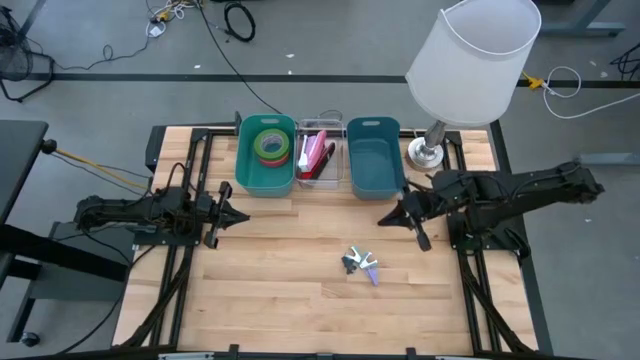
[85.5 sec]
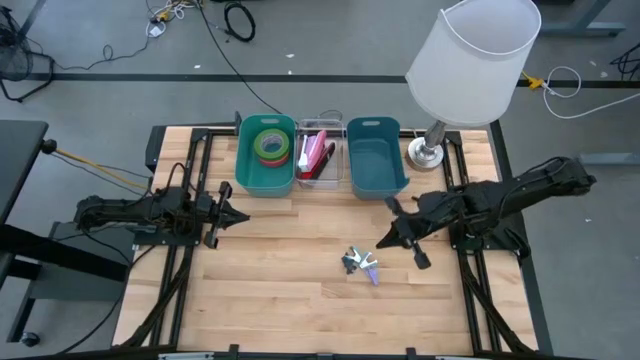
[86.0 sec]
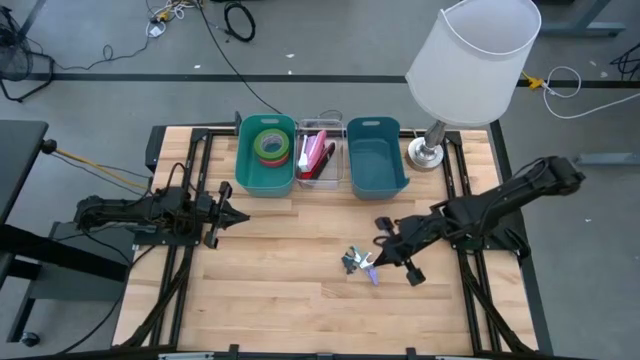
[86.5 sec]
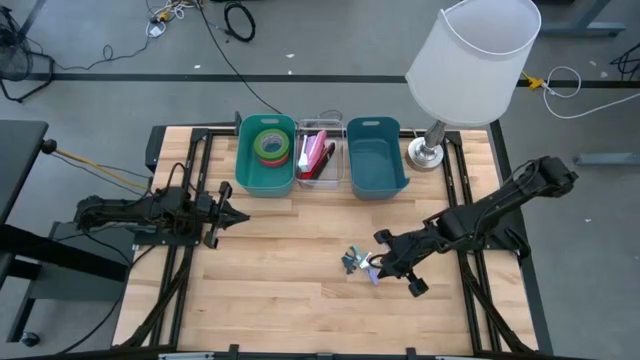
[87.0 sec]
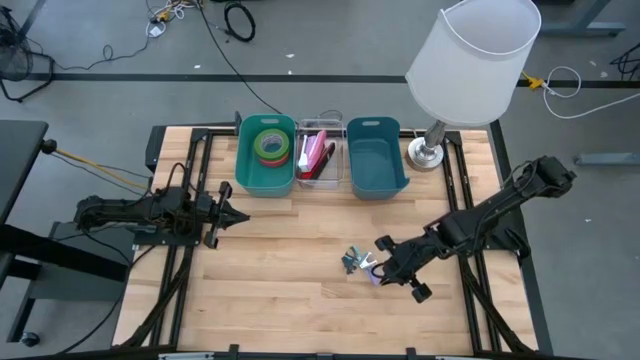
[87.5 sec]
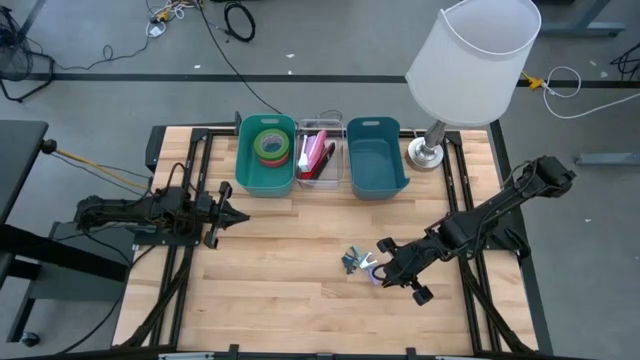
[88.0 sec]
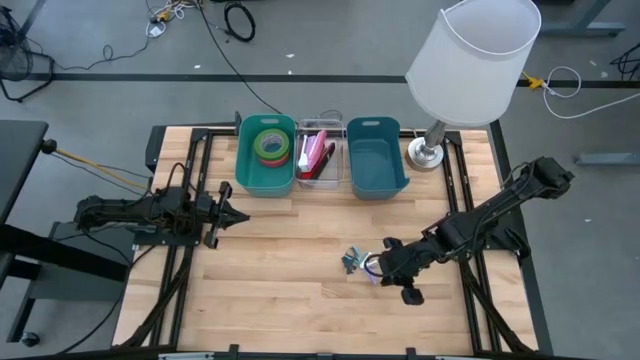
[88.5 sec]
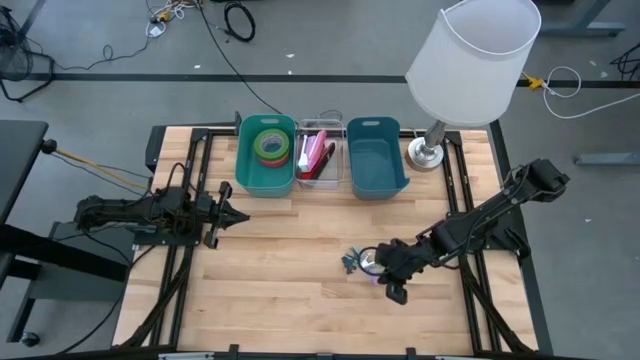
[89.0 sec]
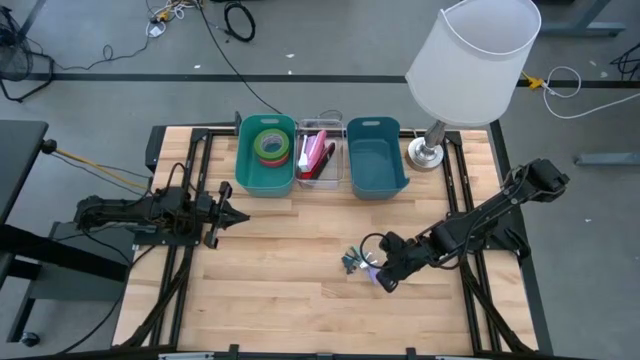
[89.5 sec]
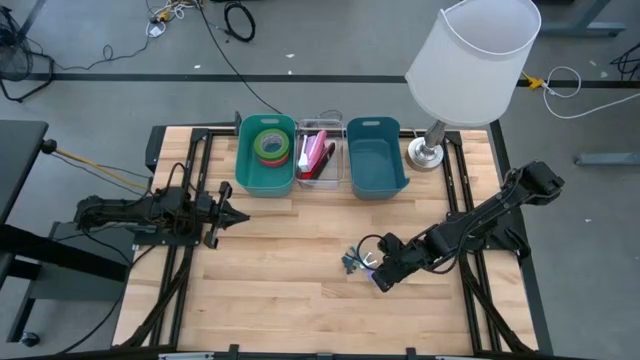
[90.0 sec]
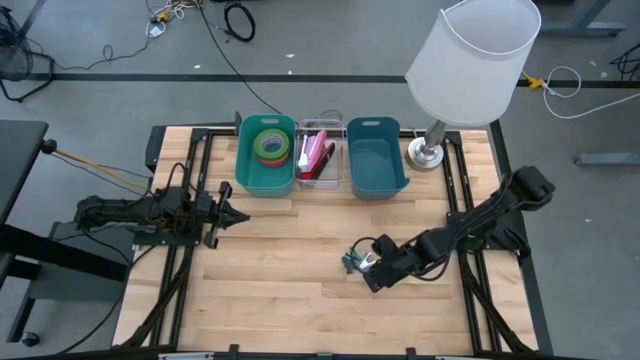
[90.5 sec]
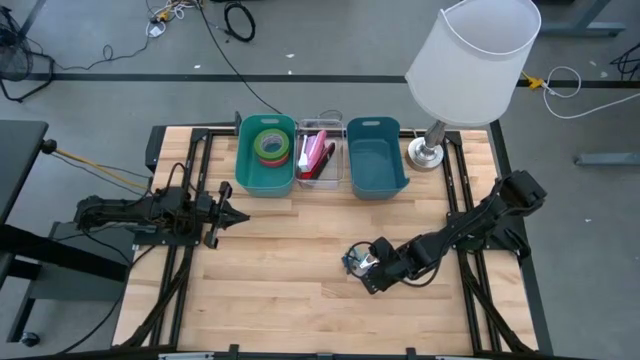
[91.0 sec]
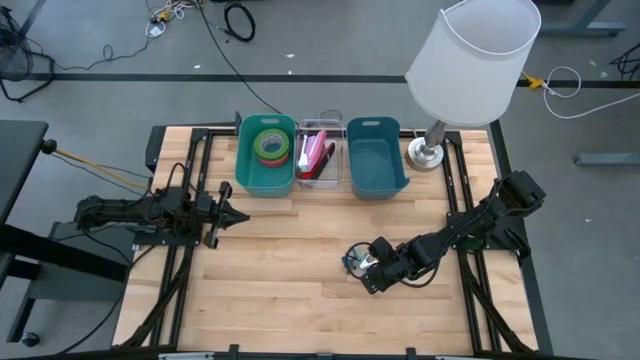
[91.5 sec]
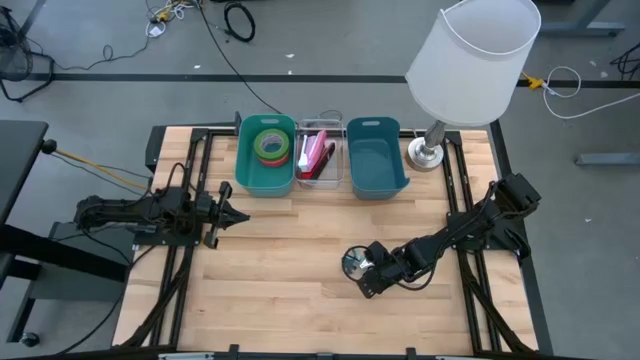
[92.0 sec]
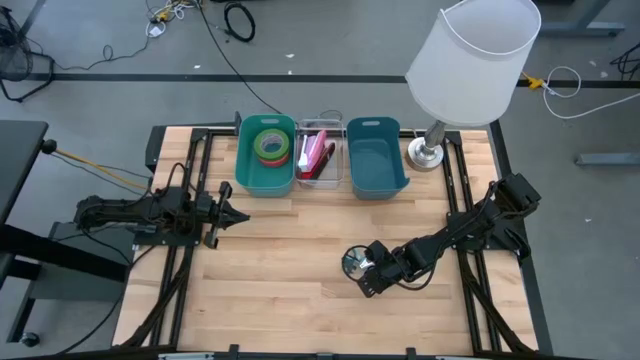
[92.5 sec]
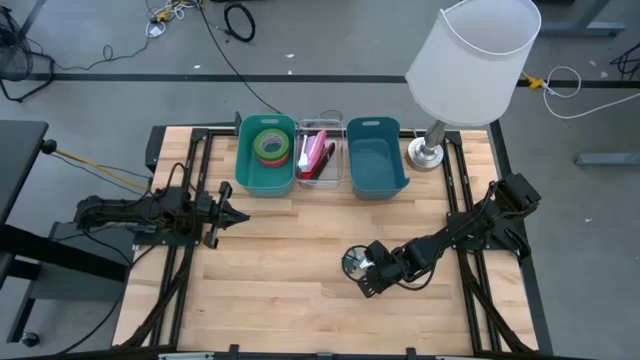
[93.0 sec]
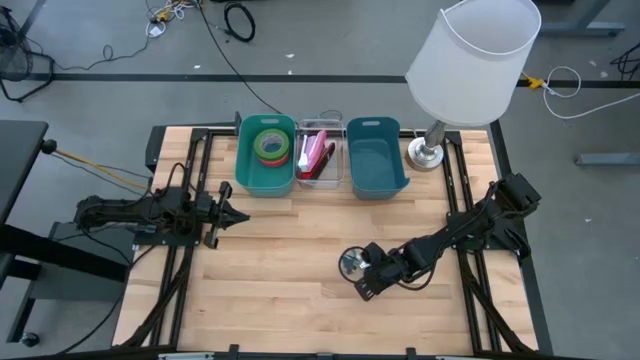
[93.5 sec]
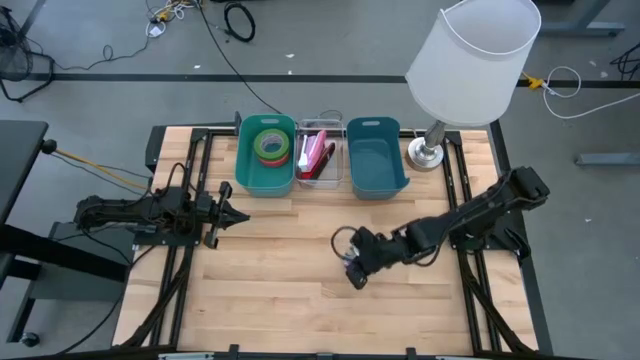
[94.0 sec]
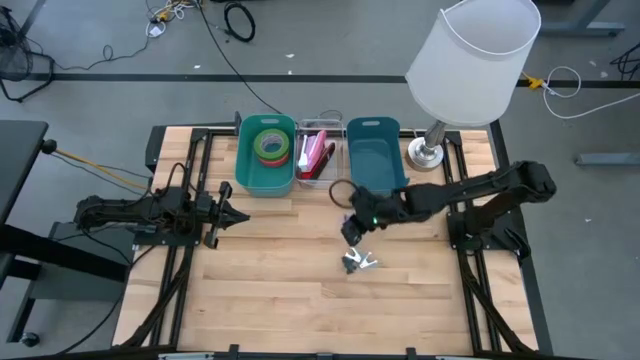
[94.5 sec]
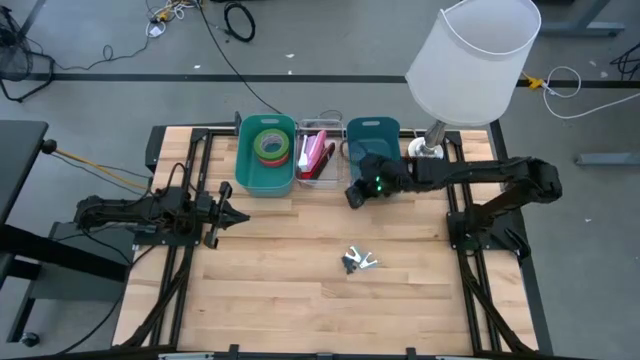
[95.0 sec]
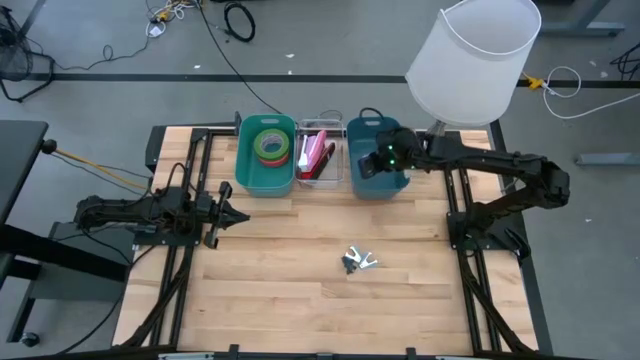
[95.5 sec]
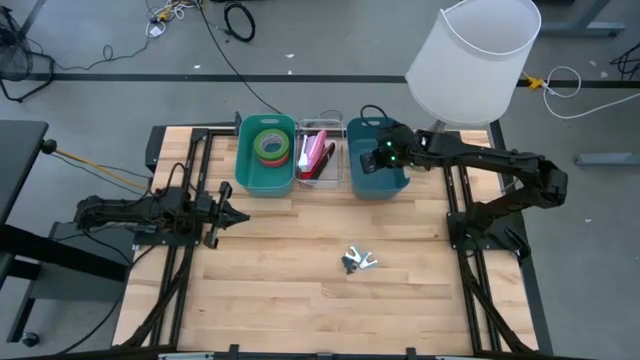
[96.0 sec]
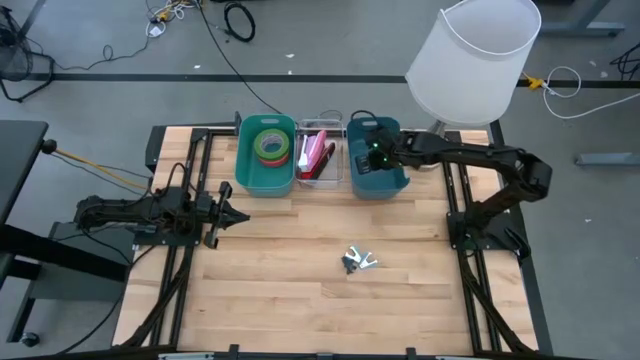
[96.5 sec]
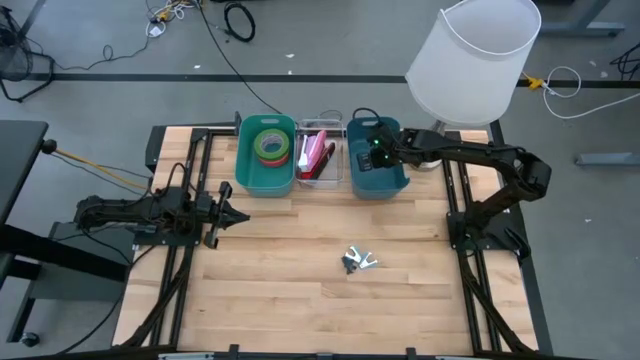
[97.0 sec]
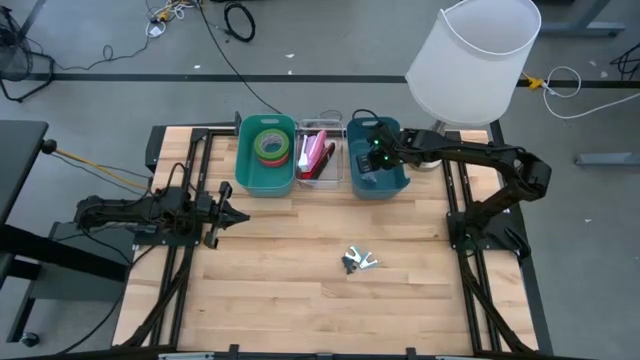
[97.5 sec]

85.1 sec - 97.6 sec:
Task: Pick and place Stapler, Stapler remover, tape
Put the violet staple remover into the blue bin

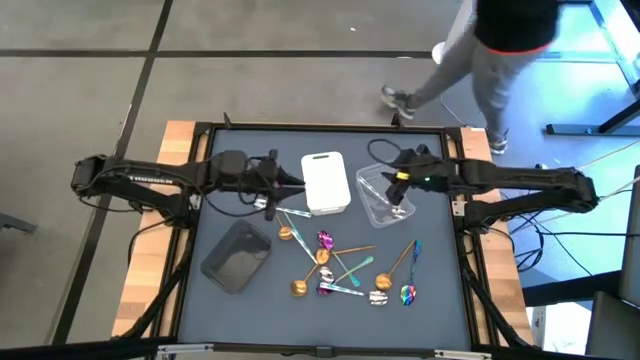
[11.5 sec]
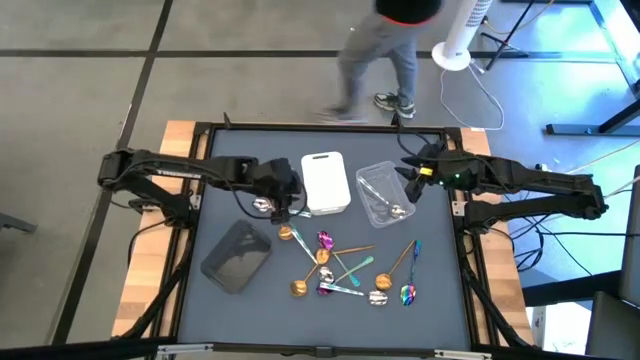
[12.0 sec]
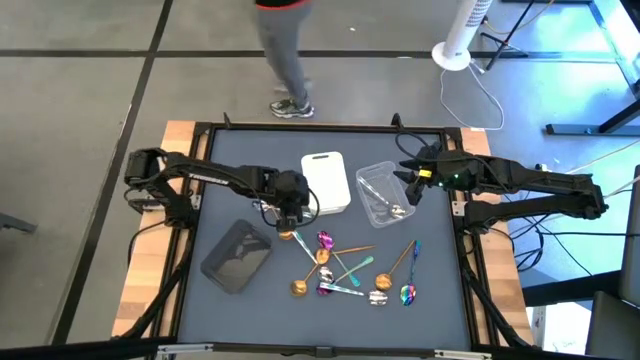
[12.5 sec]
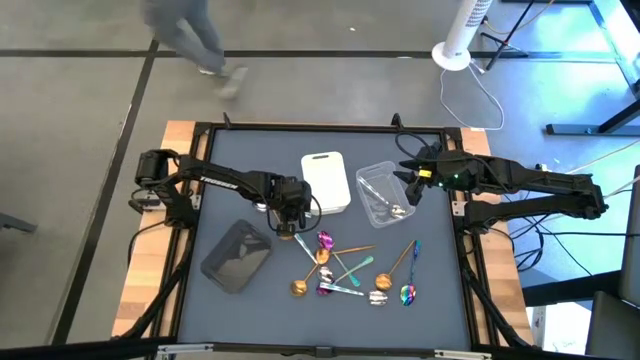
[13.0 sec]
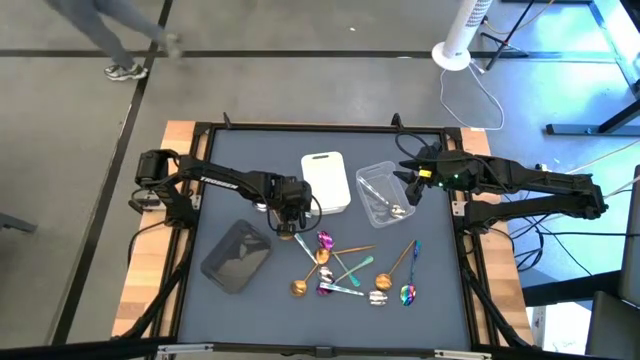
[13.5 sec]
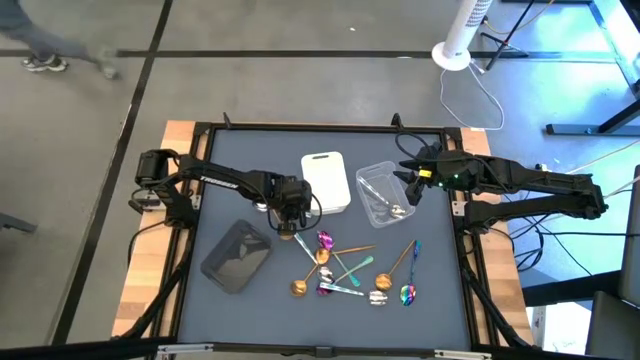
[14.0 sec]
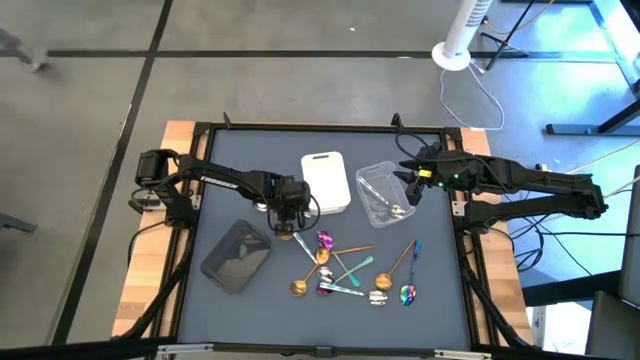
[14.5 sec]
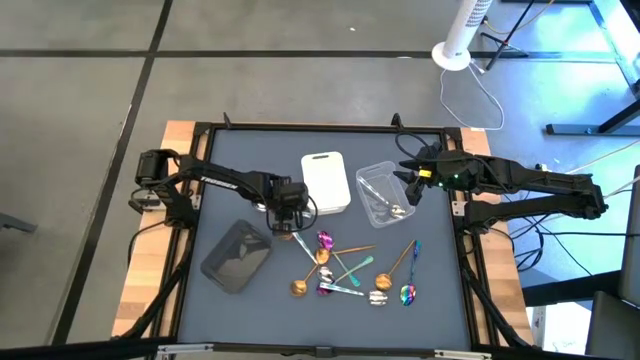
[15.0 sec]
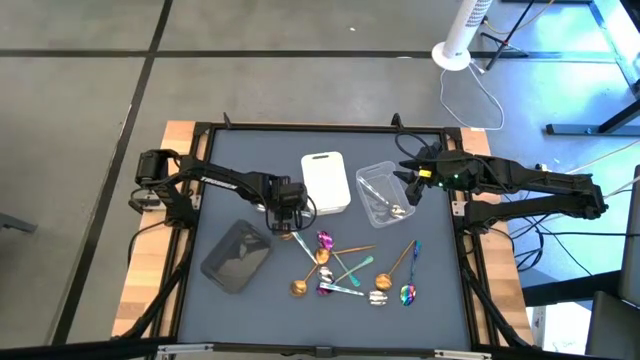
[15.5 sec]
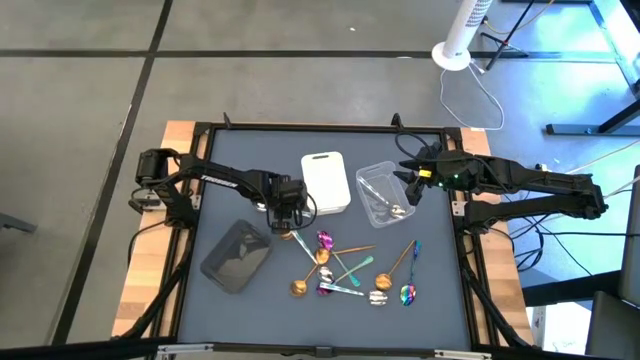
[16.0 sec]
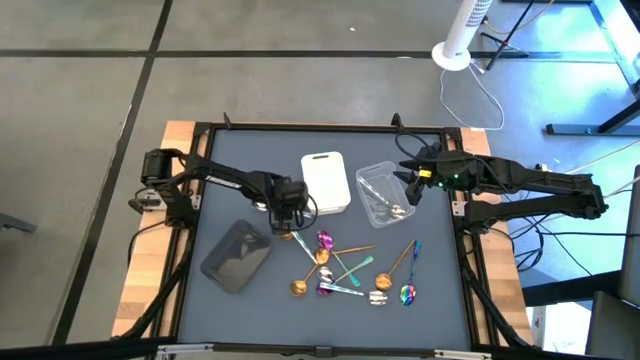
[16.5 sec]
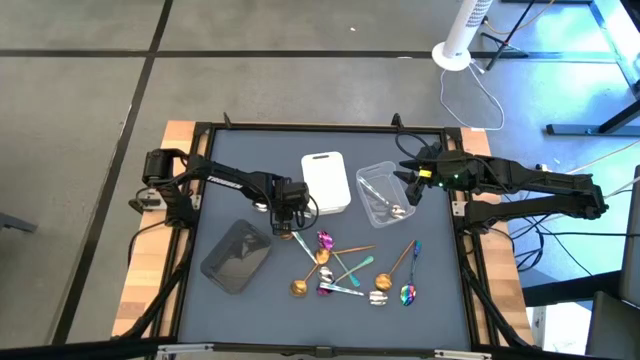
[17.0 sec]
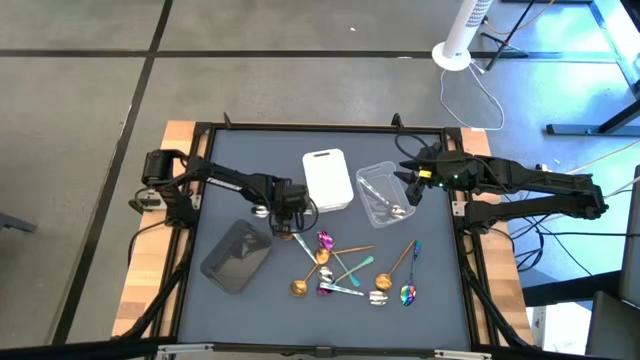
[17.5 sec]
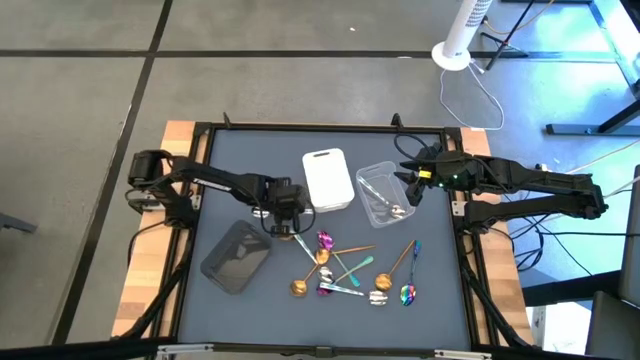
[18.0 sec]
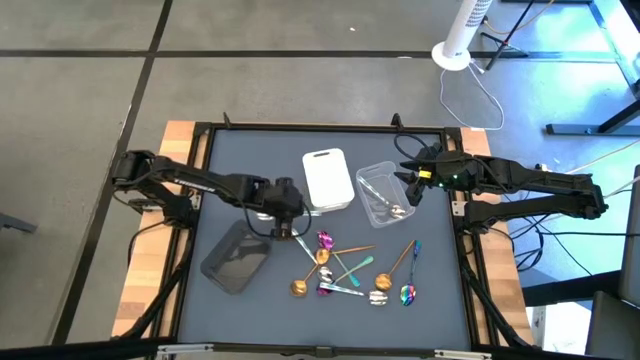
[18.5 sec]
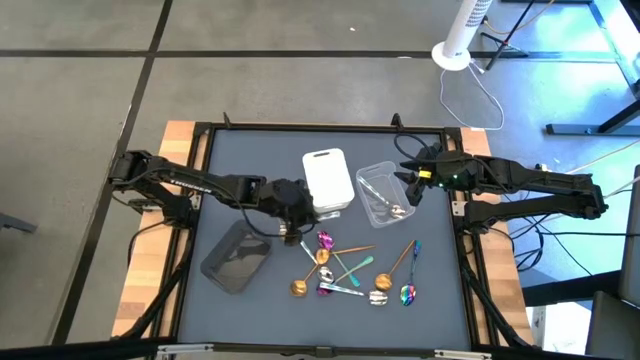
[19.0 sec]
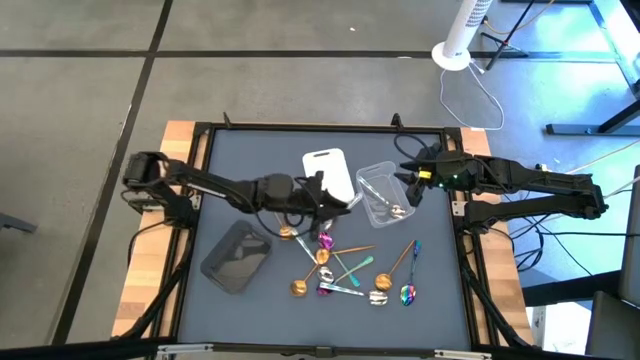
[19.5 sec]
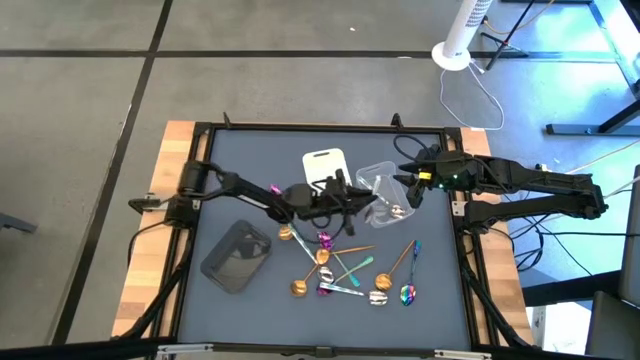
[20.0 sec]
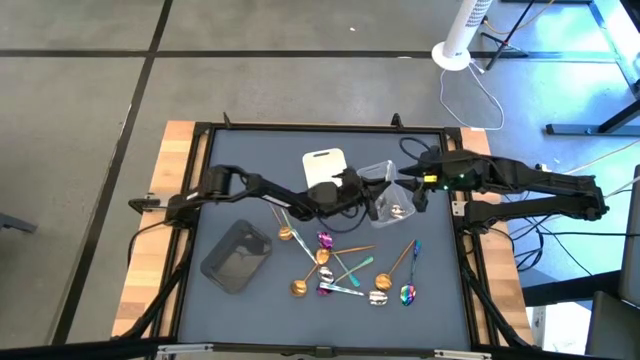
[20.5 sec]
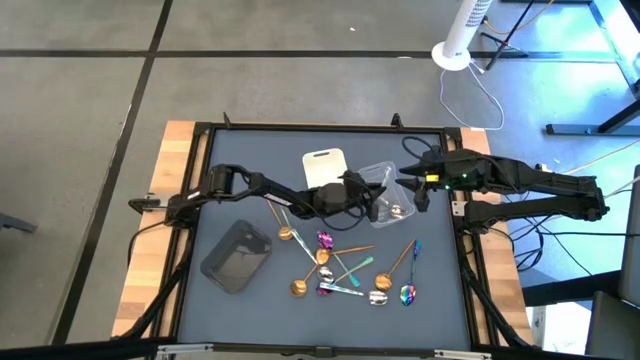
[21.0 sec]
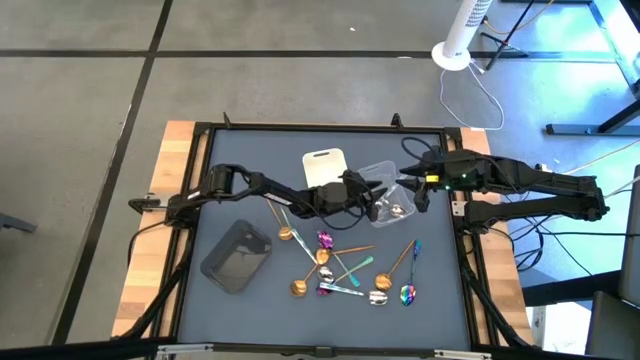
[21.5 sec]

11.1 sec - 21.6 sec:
Task: Sort silverware by color (type)
Put the green spoon into the transparent bin
